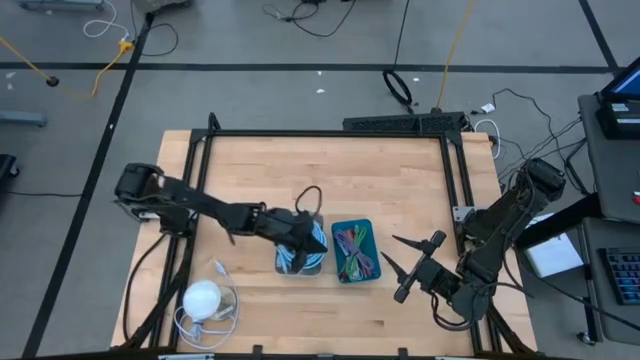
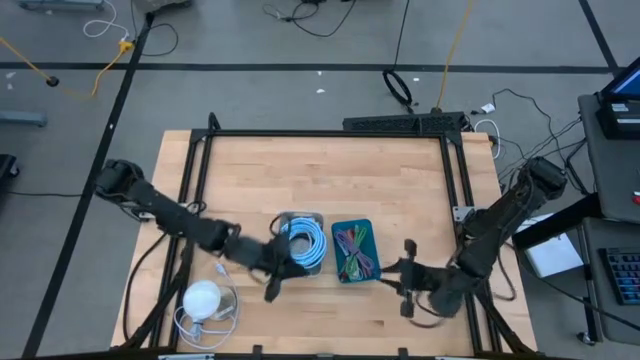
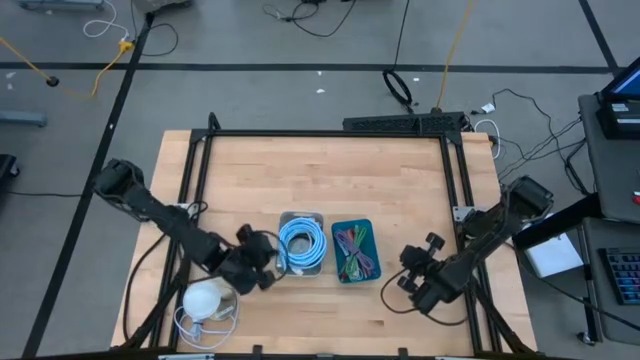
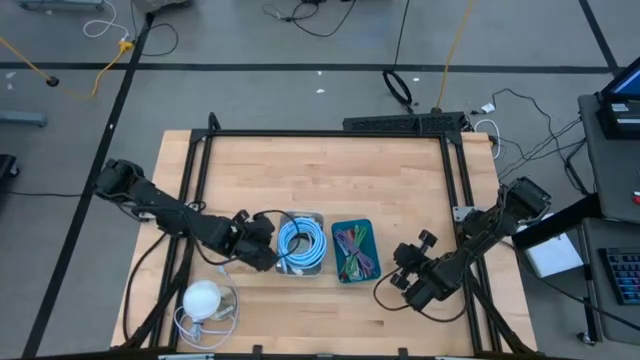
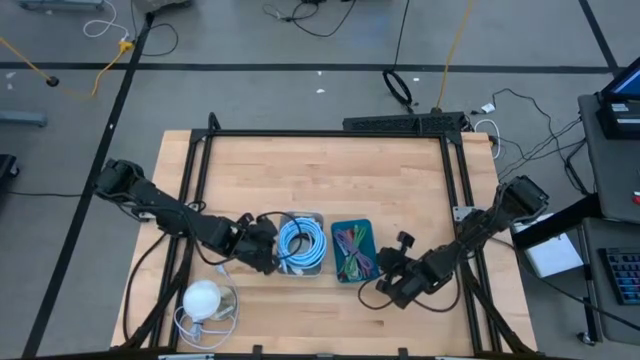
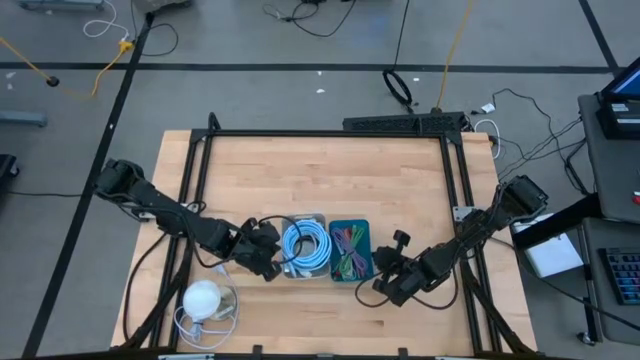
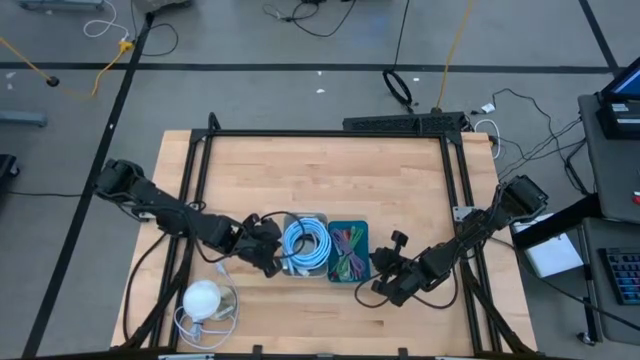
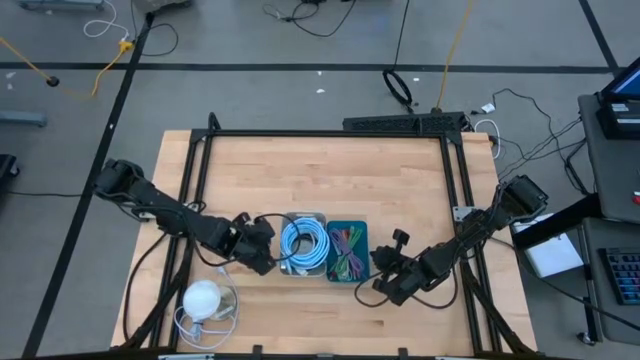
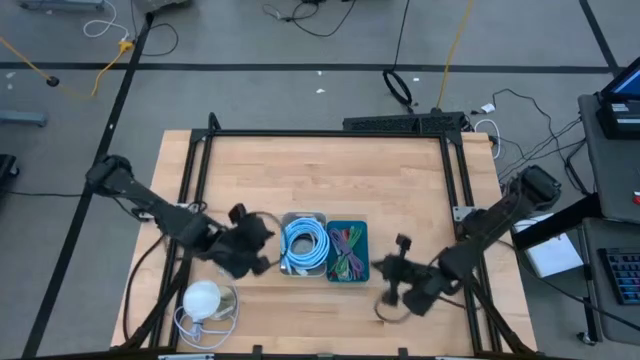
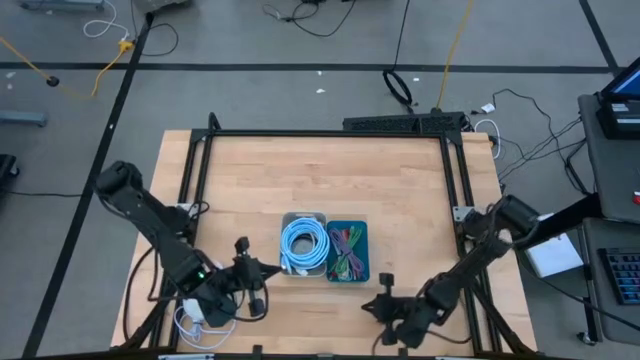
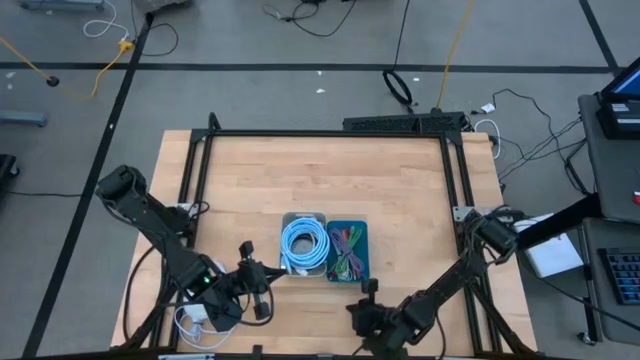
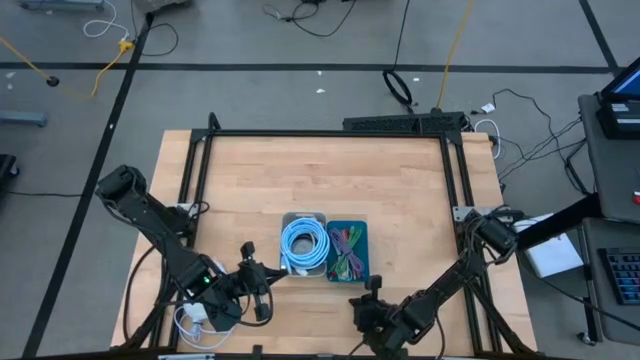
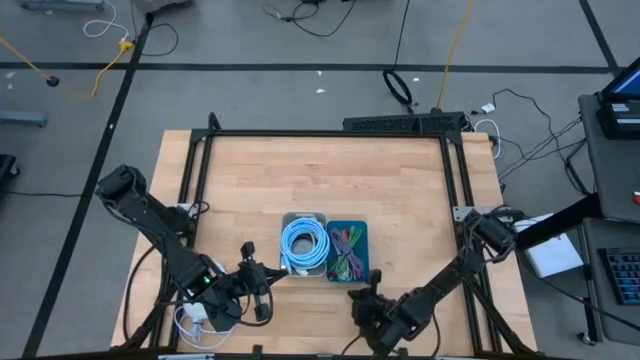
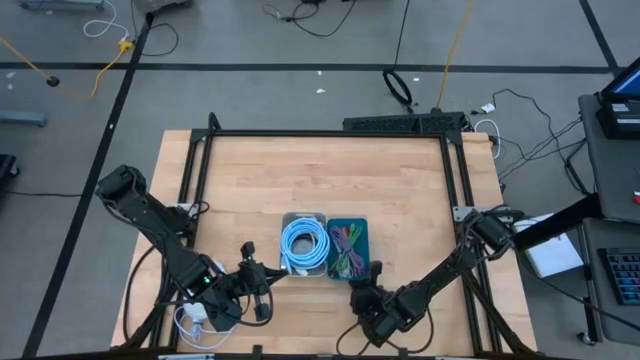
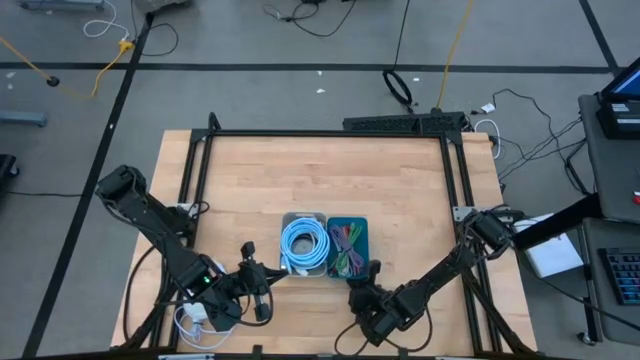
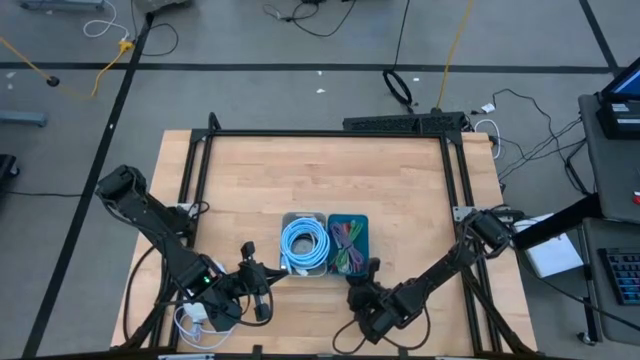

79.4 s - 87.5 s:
Task: Pick & Place USB Port
Adjust the bins

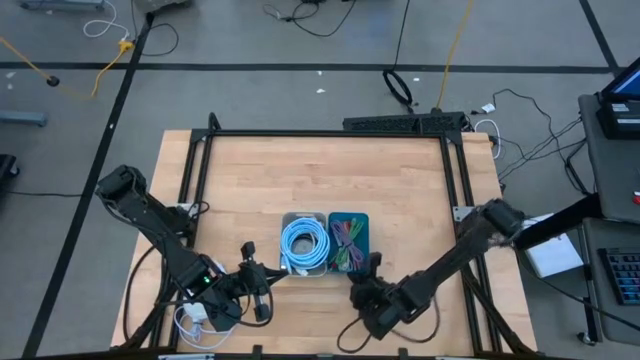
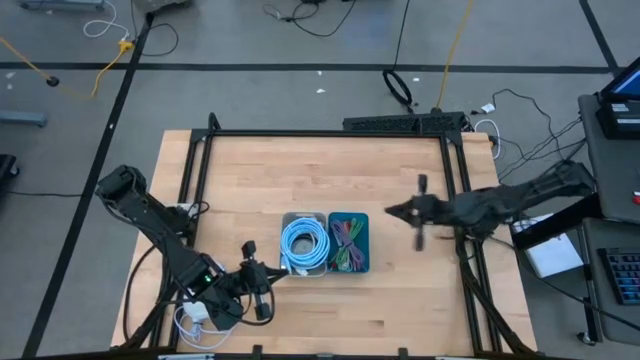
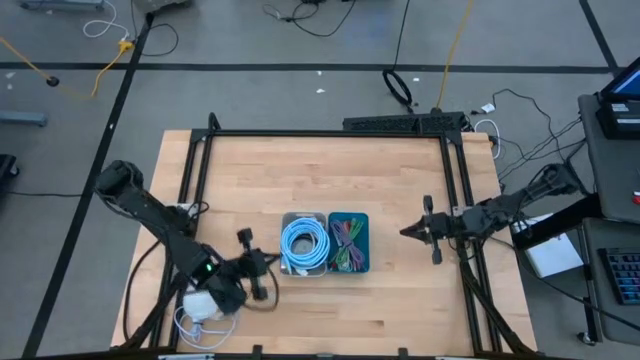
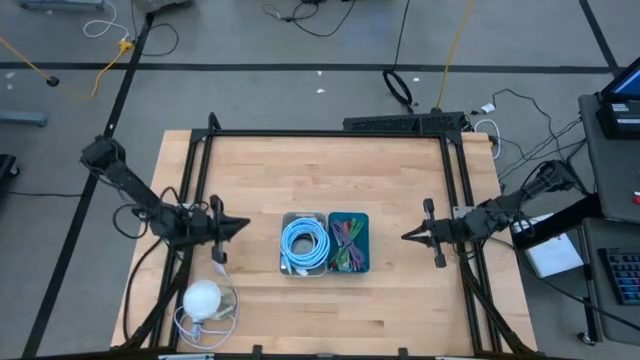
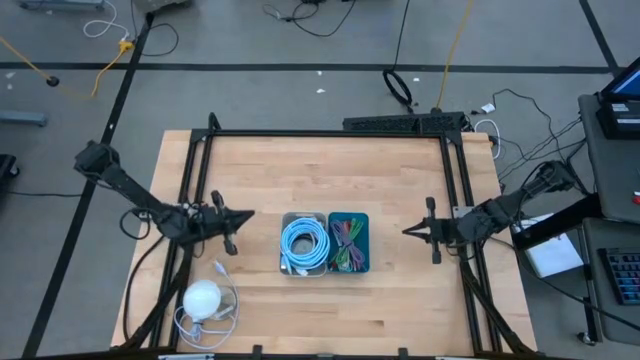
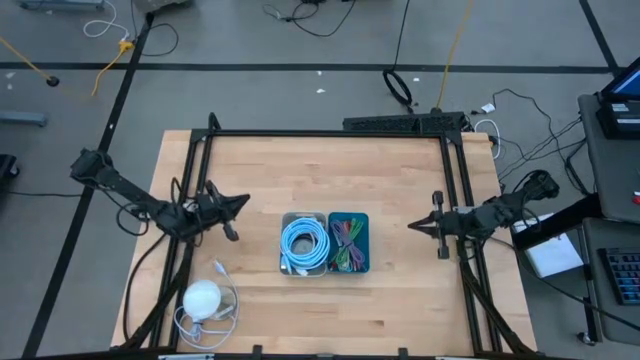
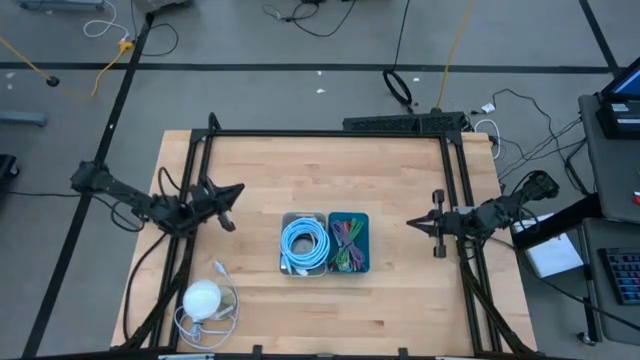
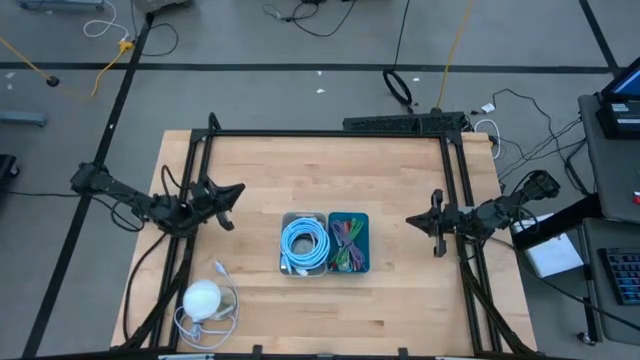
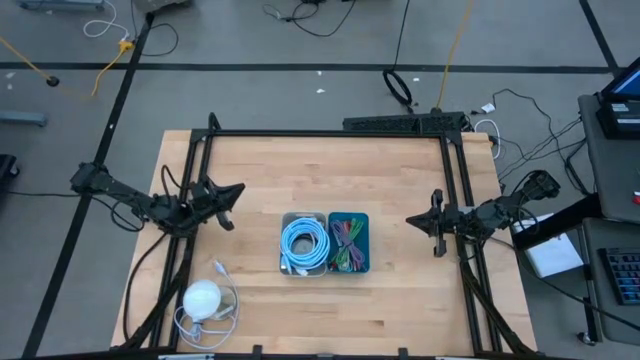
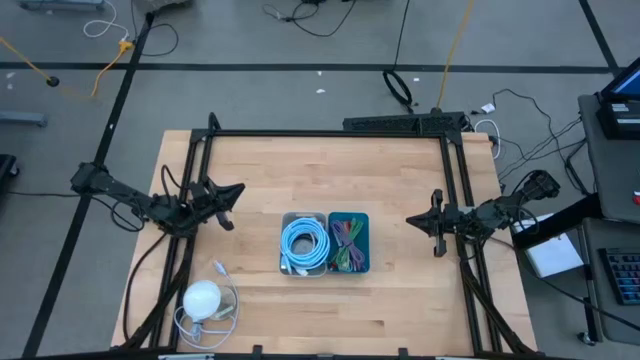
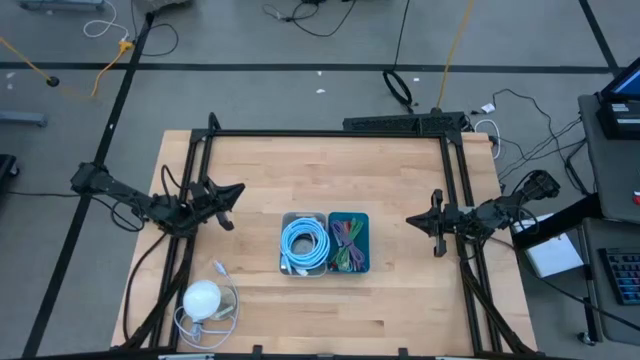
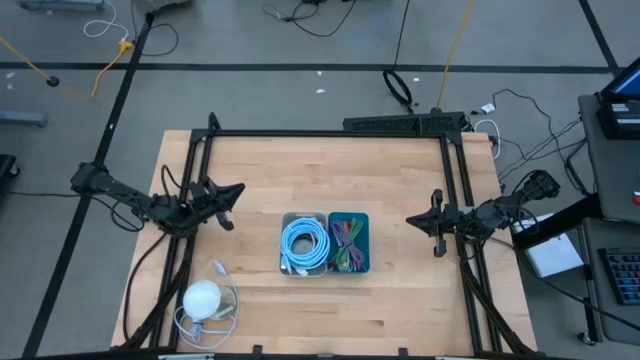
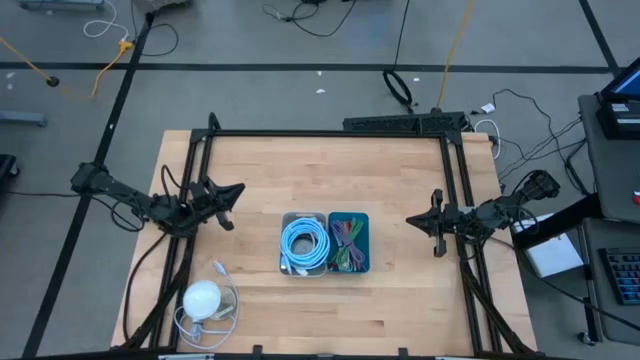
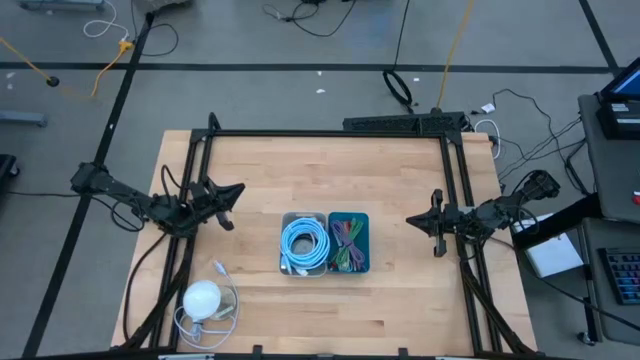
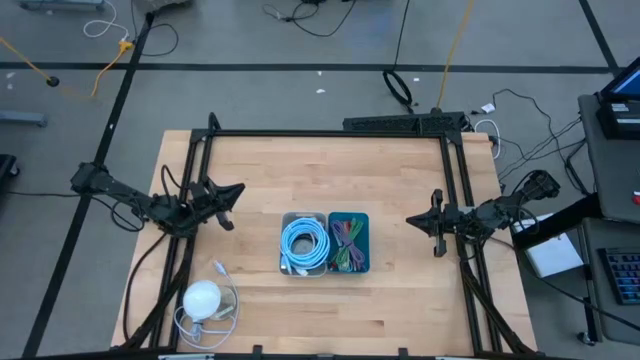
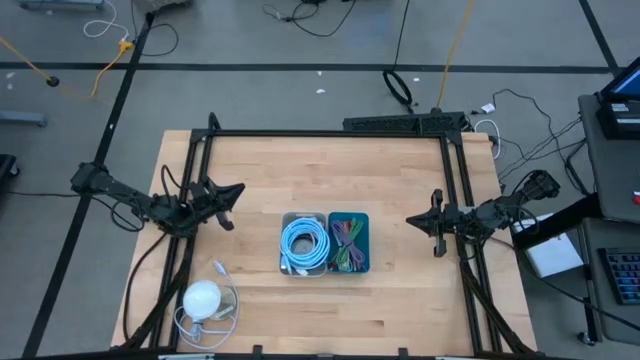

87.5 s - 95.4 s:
Return to Home Position

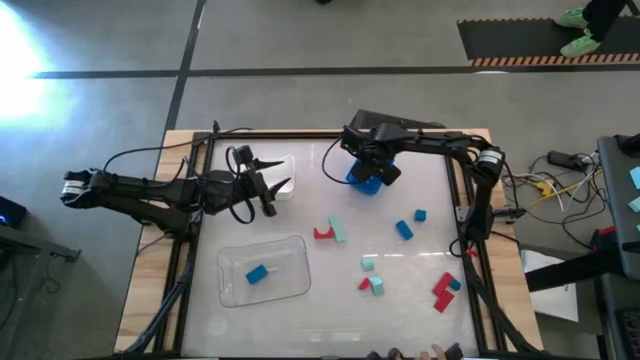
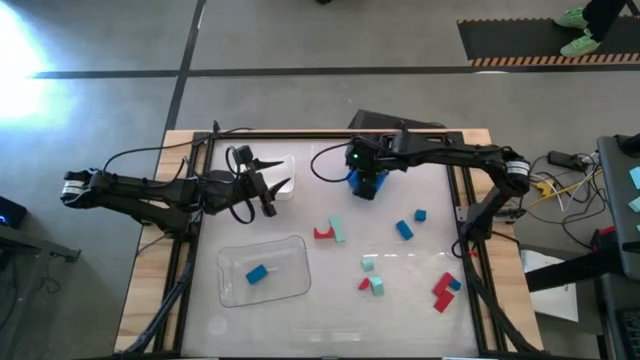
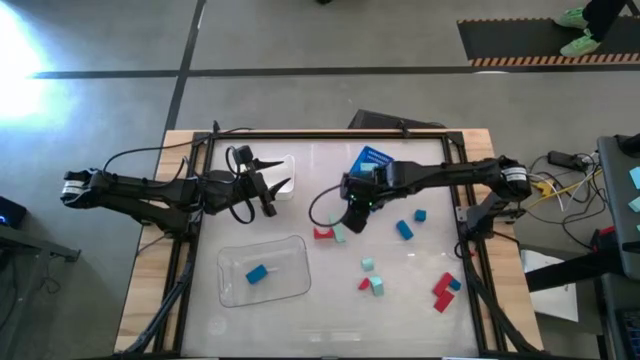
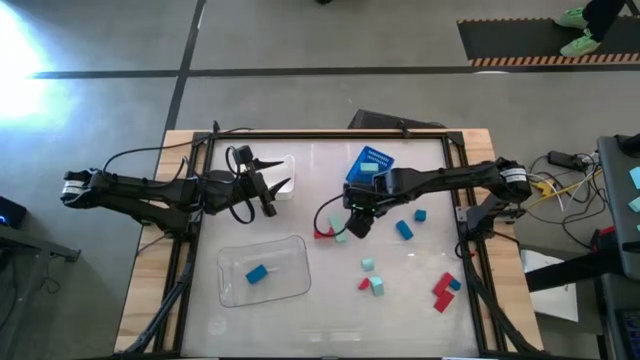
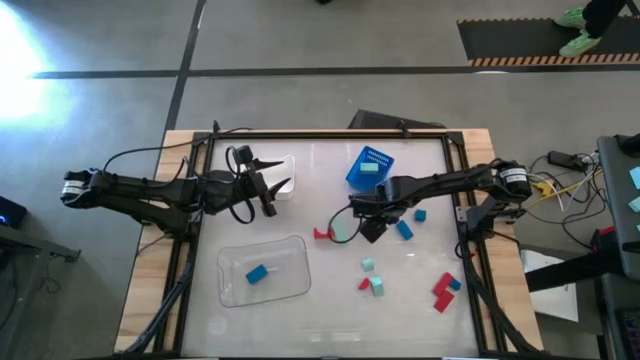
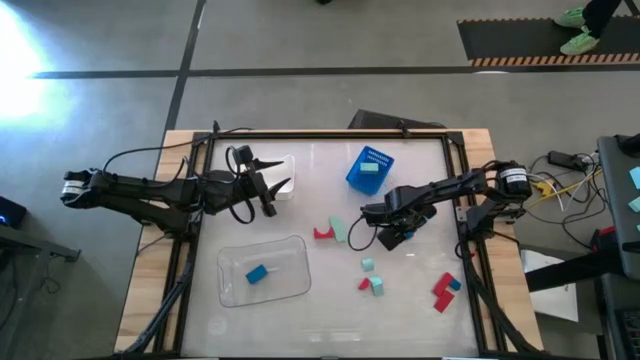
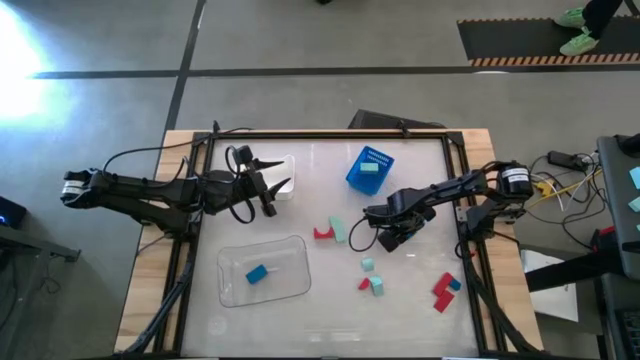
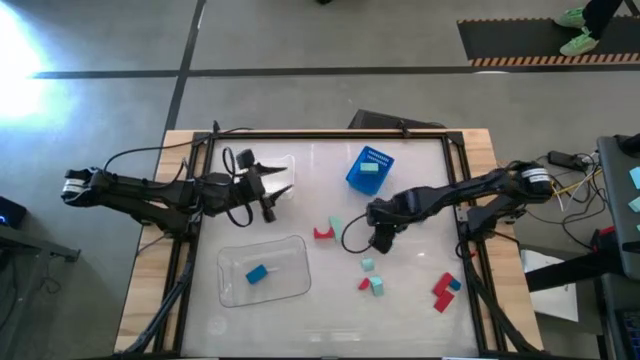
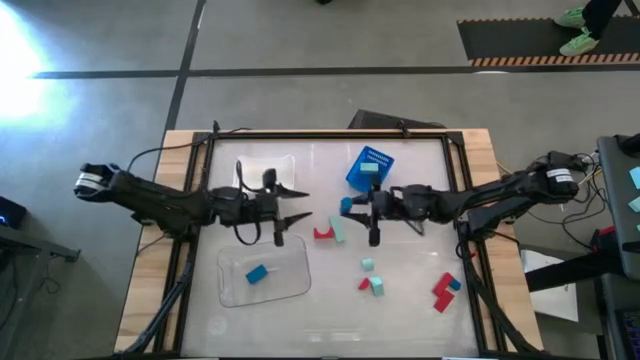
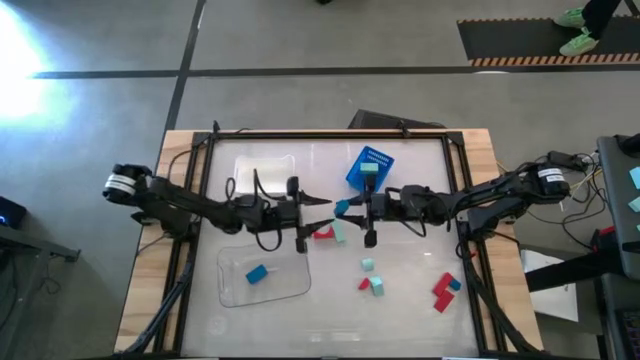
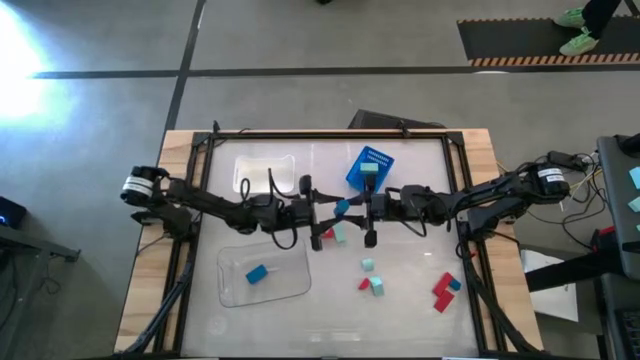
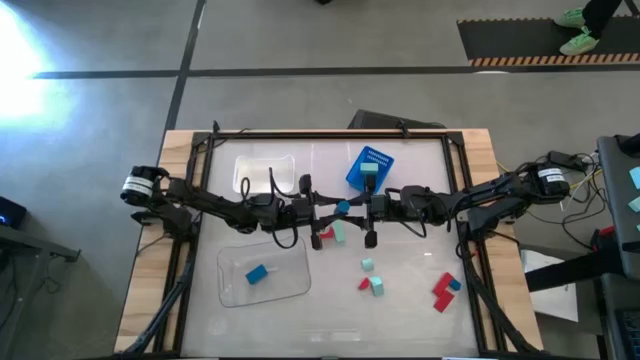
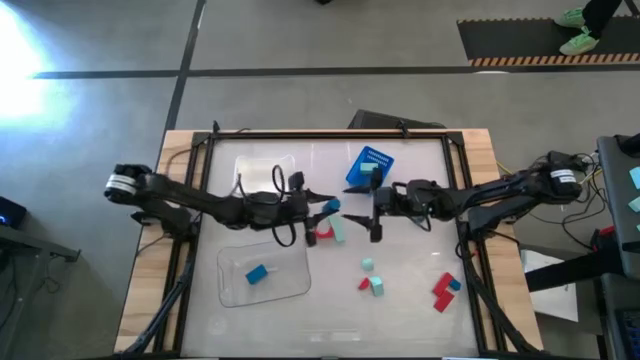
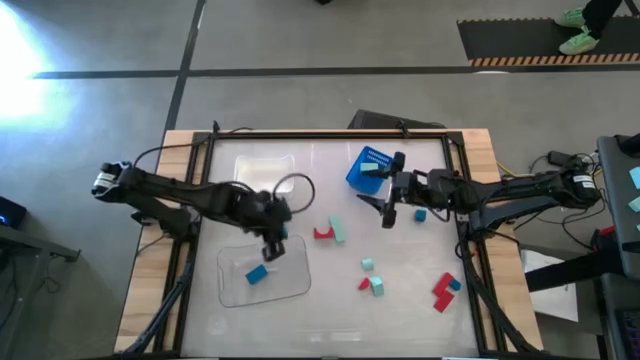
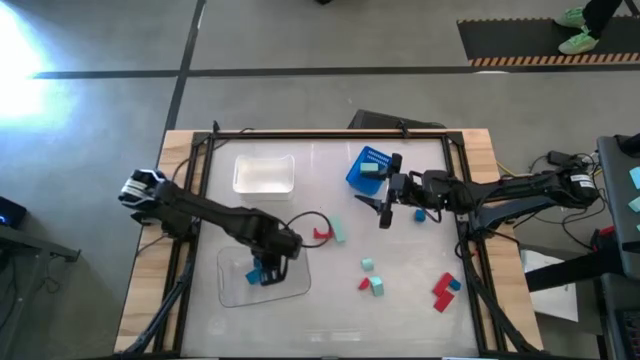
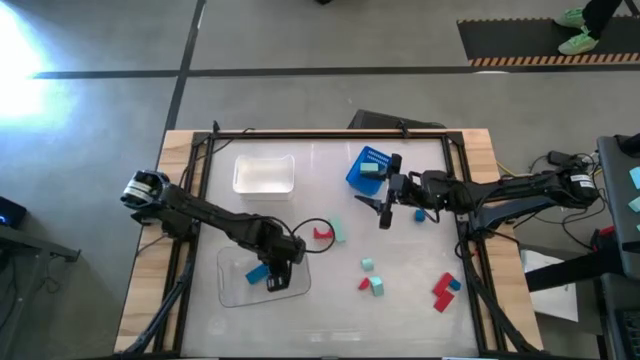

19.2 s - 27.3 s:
Task: Sort & place blocks by color
Put the blue block into the transparent bin
